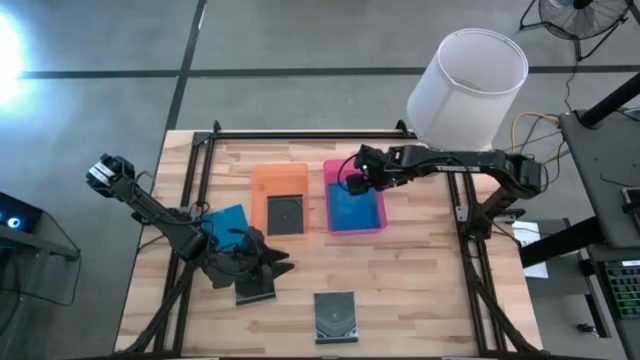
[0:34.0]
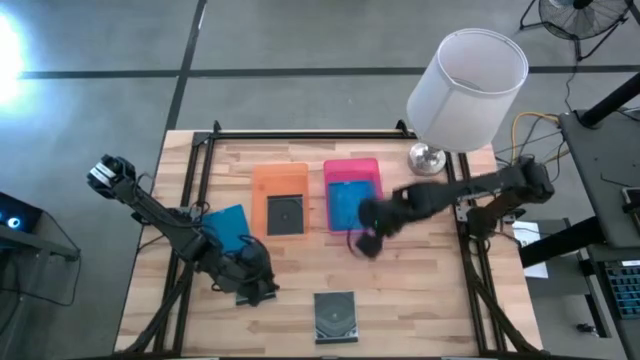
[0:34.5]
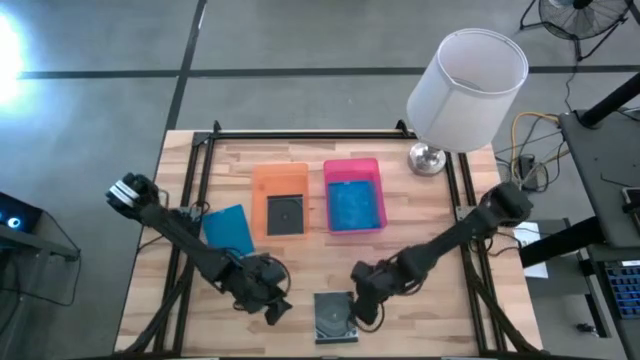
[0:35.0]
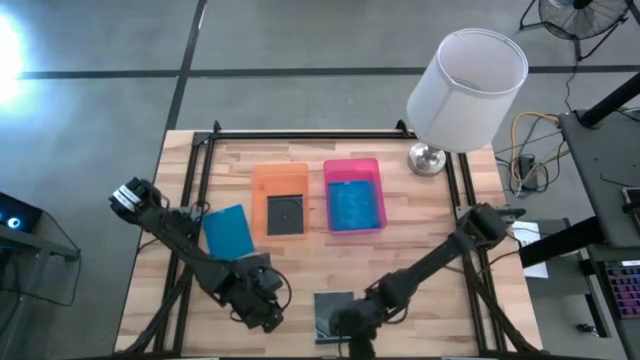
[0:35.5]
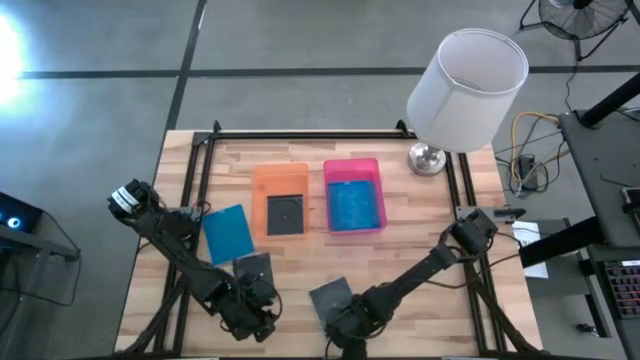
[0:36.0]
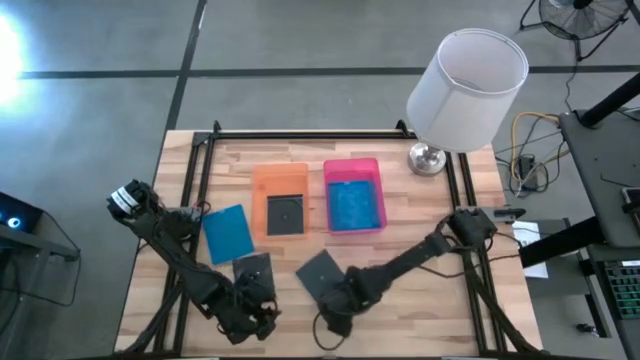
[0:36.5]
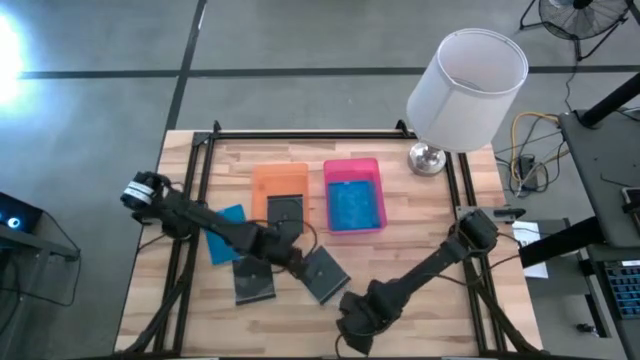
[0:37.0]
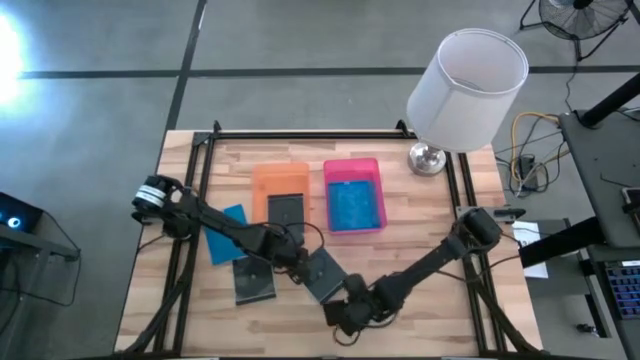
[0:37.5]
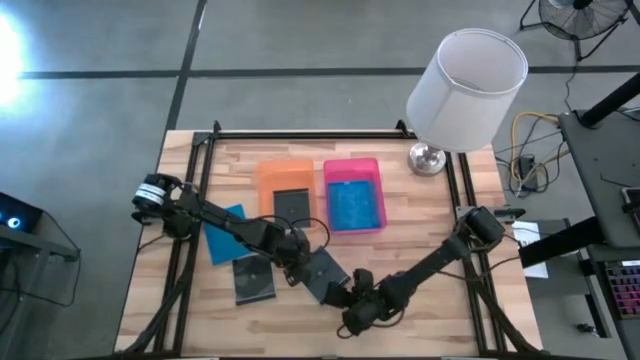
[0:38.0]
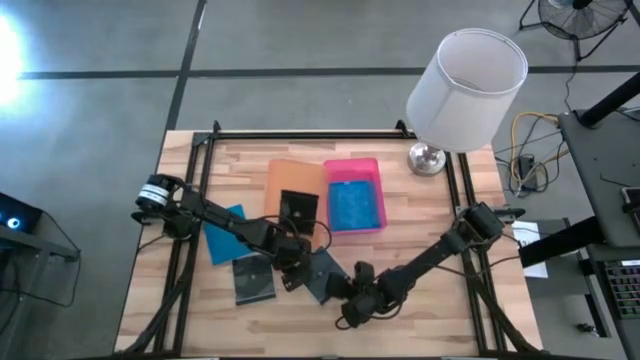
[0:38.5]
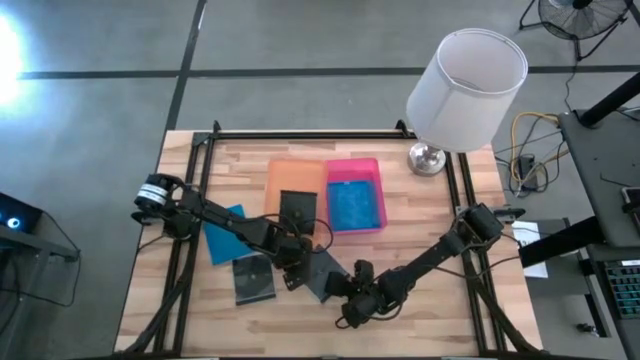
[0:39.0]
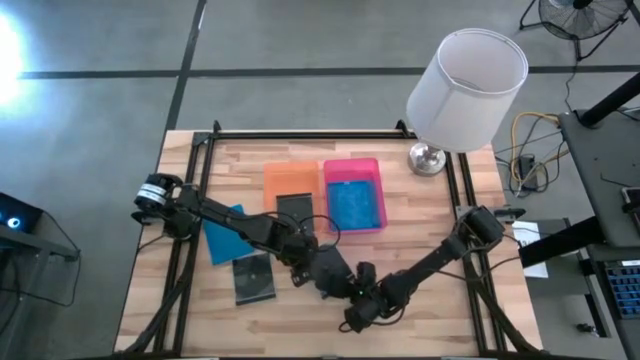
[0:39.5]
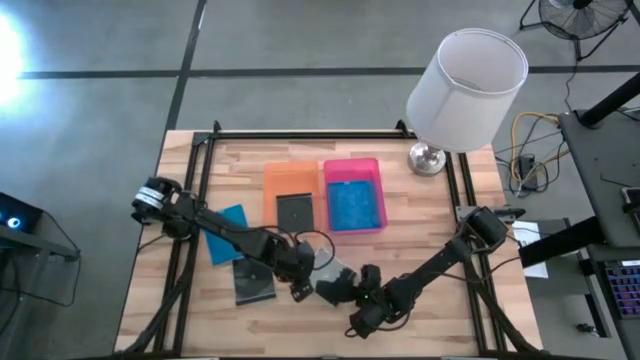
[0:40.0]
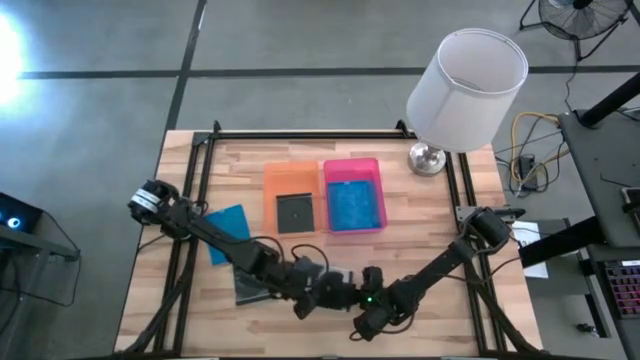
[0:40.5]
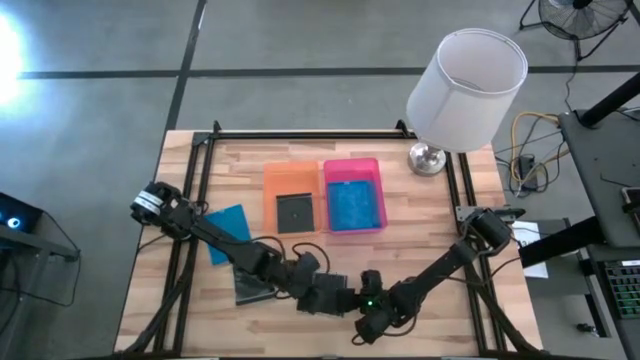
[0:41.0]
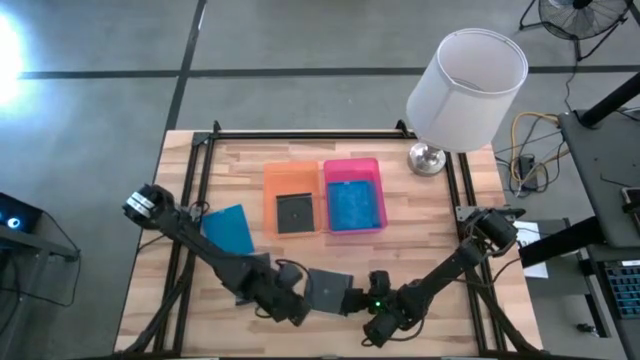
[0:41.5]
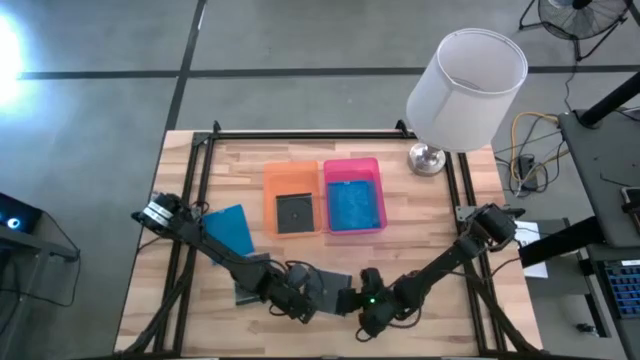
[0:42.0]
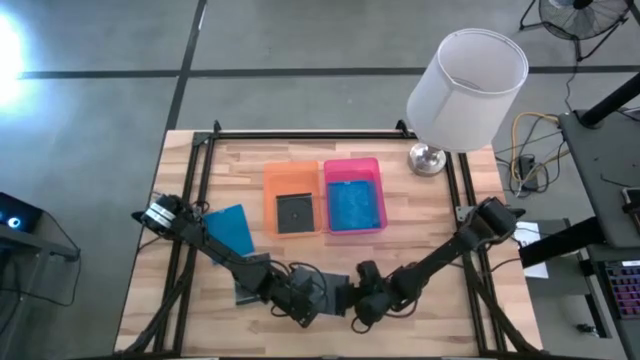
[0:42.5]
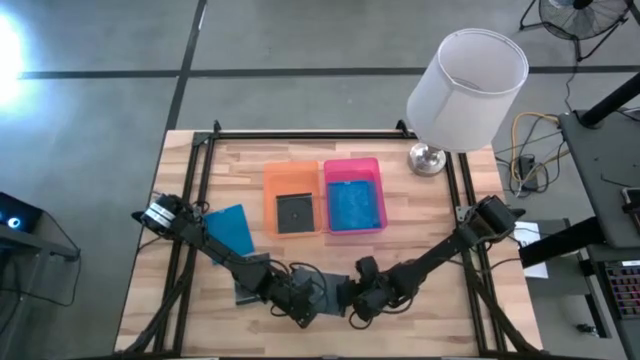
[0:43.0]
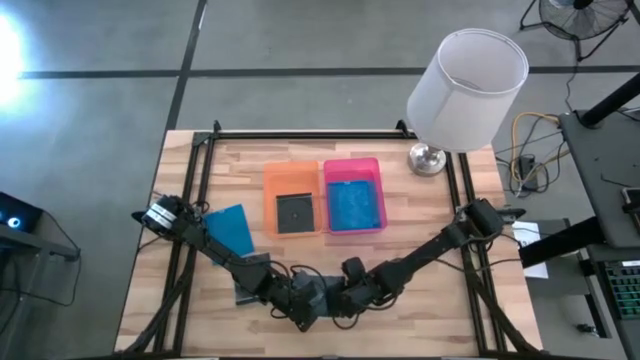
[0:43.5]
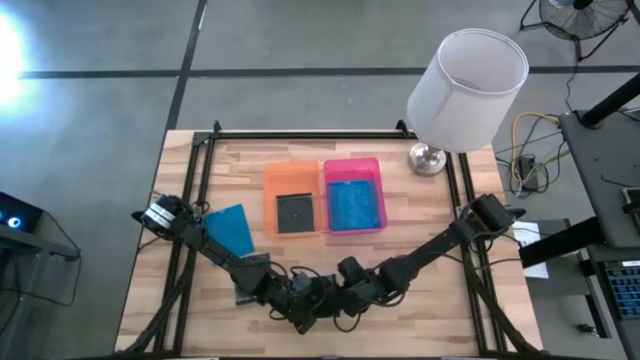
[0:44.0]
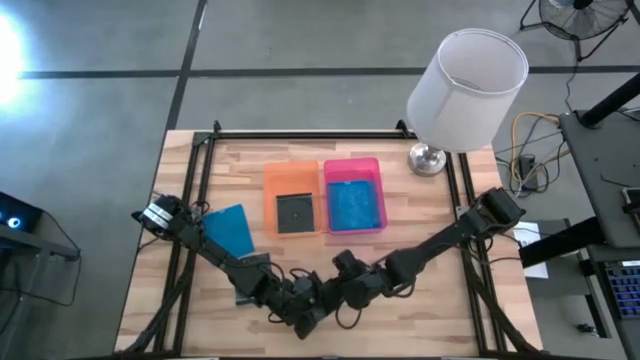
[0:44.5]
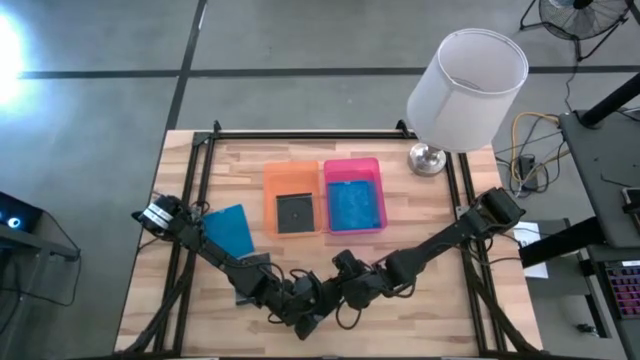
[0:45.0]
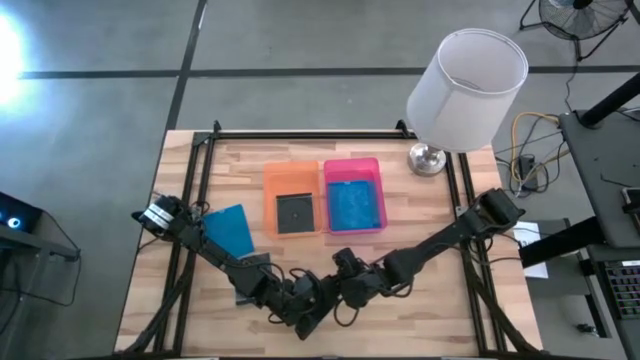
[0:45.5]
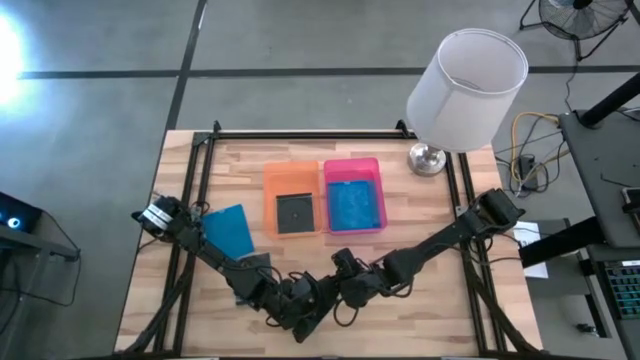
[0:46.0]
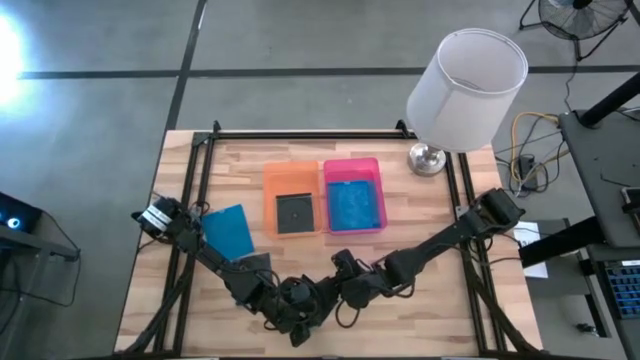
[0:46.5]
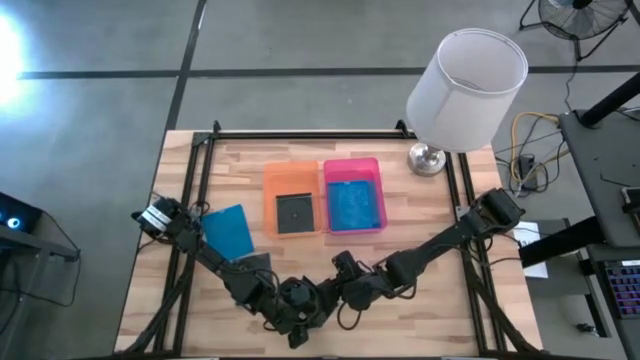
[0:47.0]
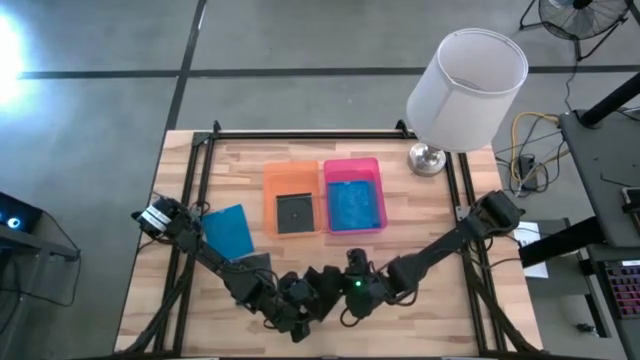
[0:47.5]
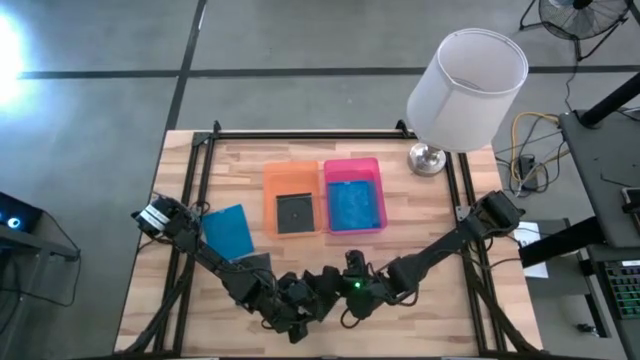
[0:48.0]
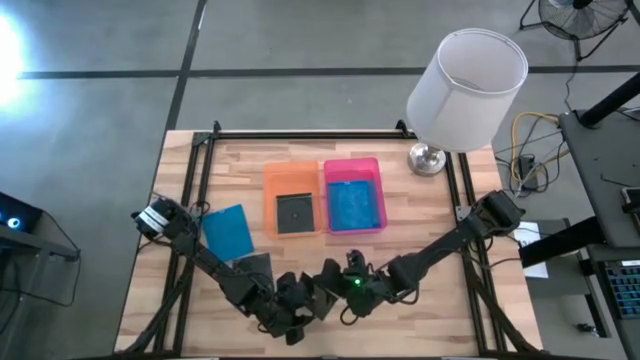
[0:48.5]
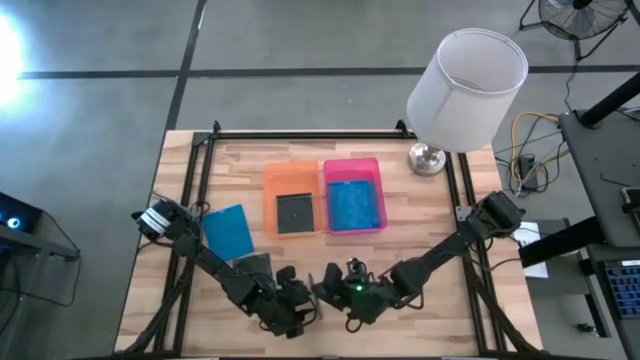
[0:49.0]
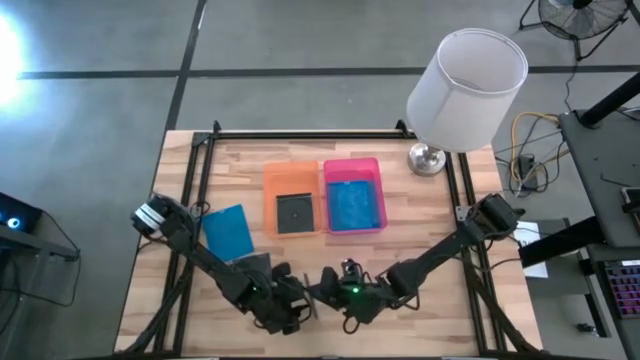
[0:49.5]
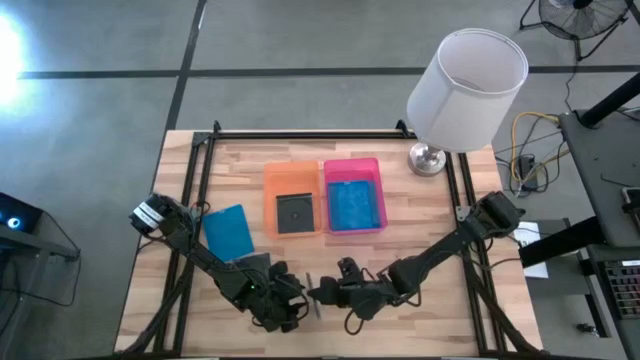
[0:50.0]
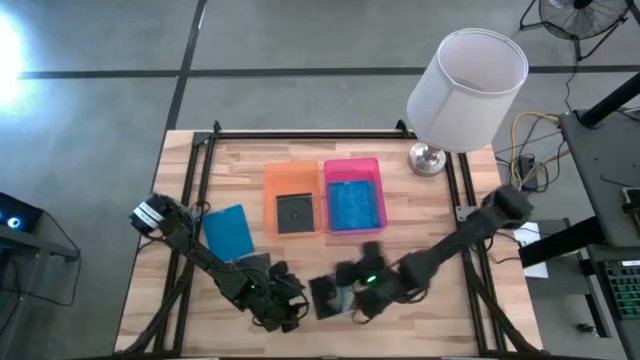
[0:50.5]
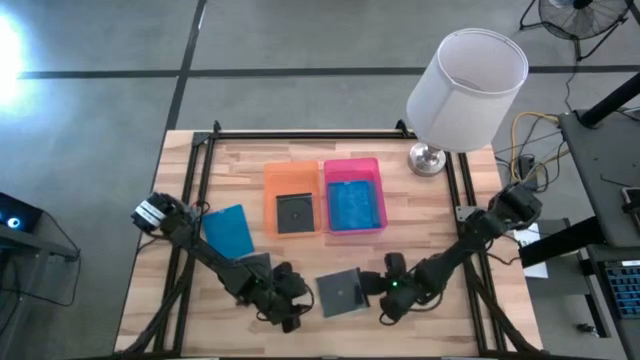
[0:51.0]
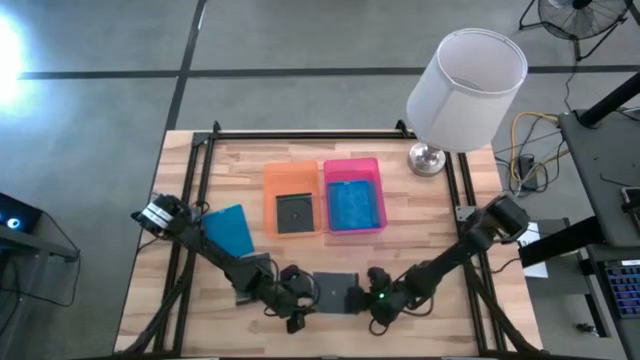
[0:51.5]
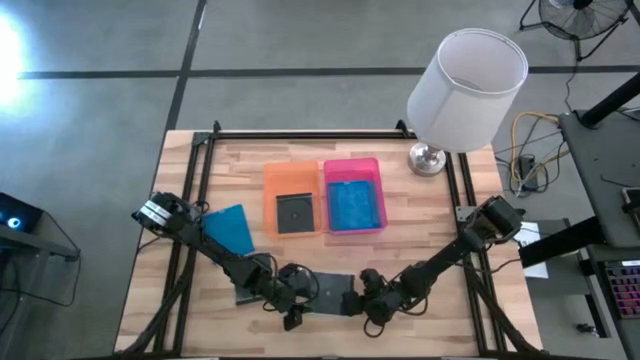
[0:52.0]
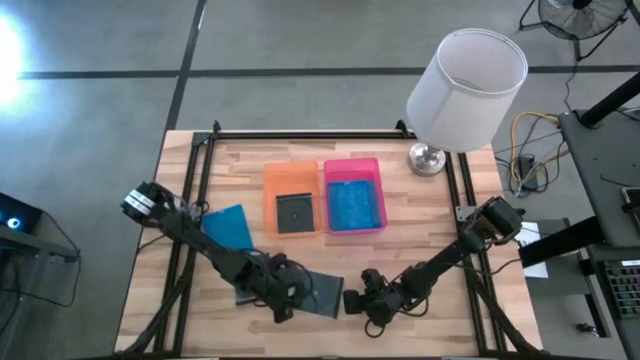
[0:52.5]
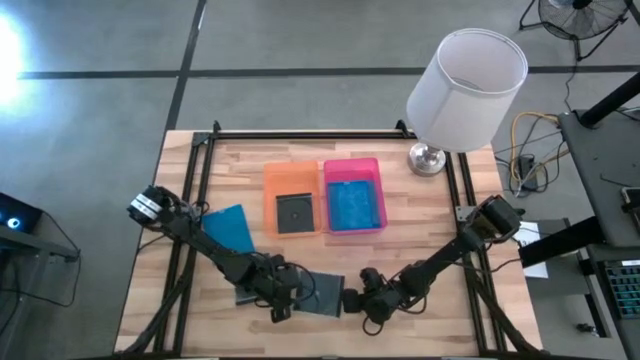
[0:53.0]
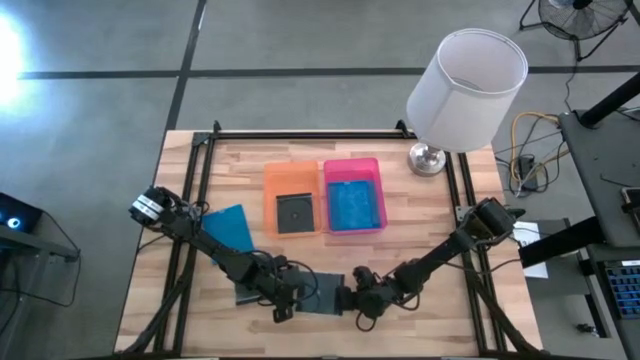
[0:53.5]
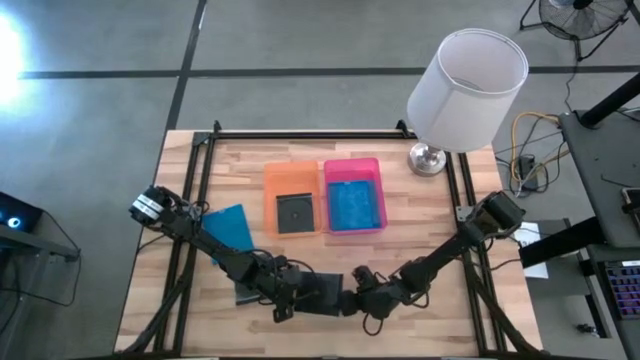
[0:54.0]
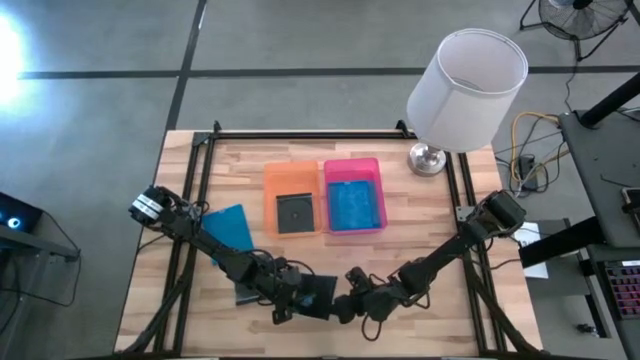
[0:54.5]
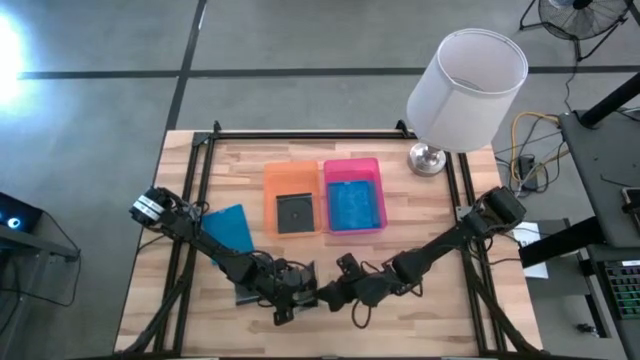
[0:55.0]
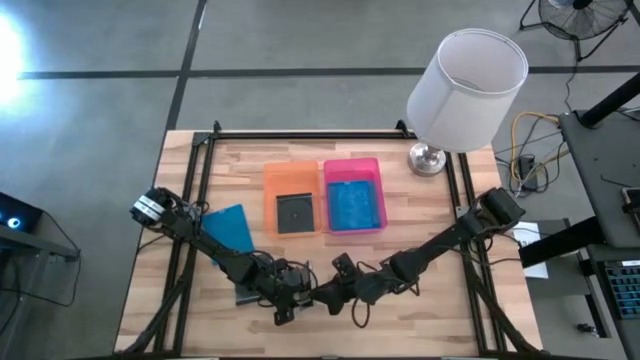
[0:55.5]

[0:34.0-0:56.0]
Task: Pick & place jewel cases by type
Put the bottom black cd case into the orange bin
